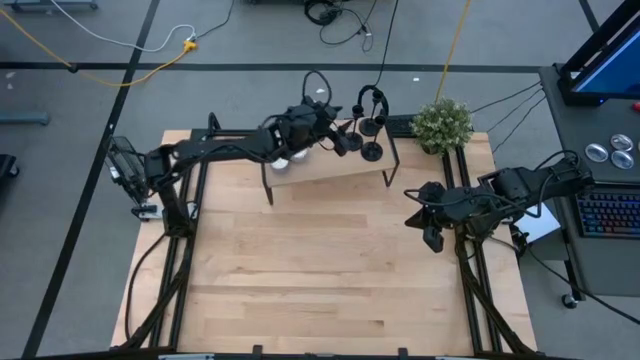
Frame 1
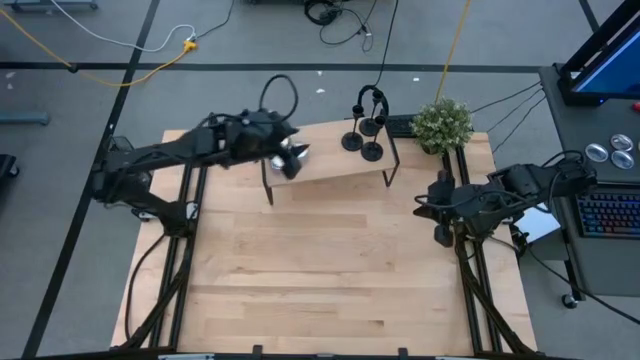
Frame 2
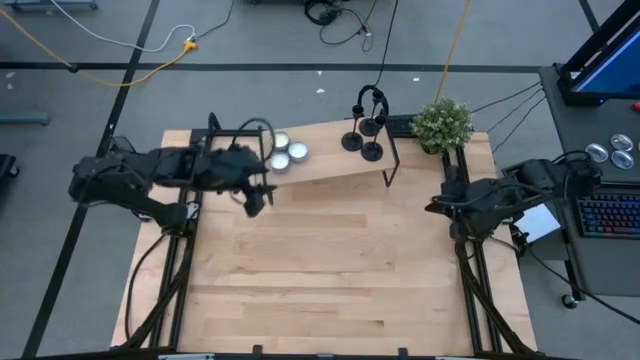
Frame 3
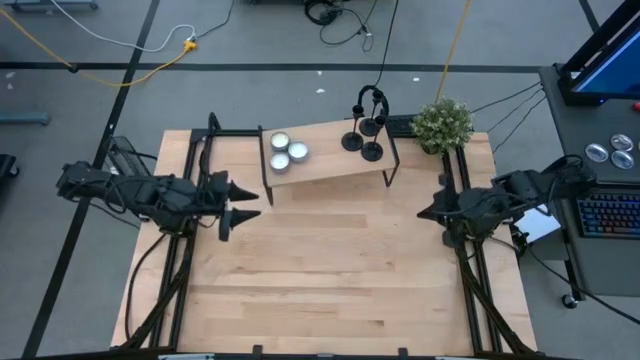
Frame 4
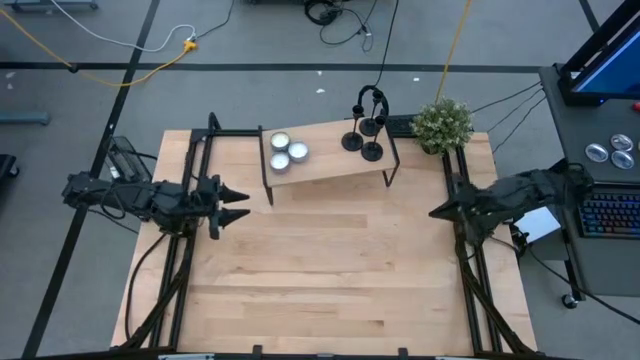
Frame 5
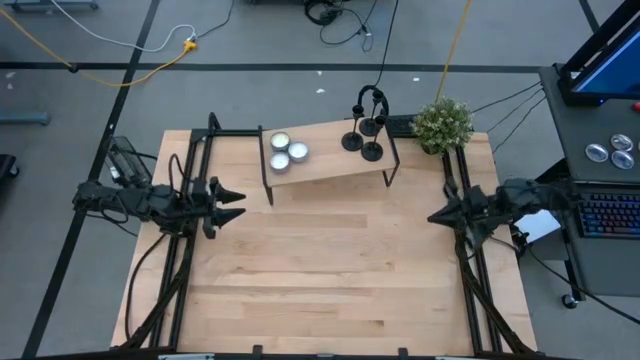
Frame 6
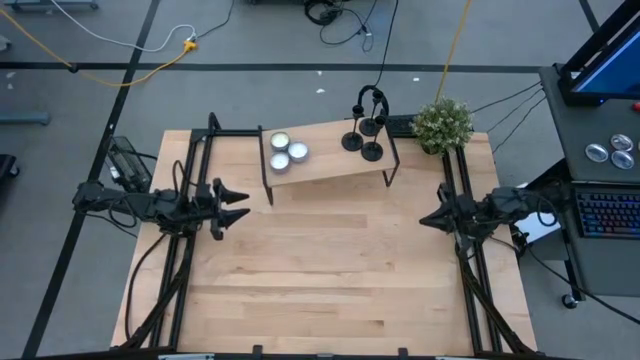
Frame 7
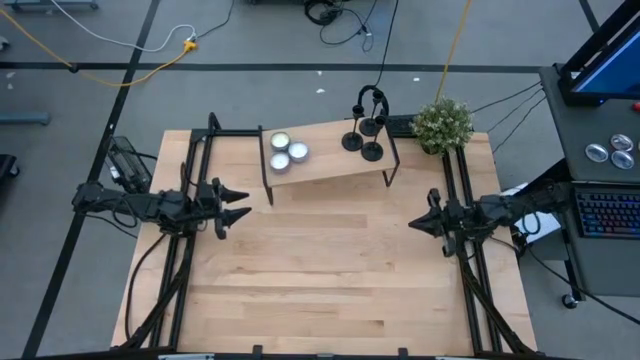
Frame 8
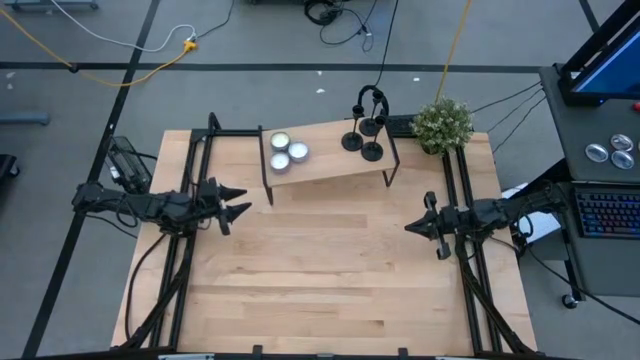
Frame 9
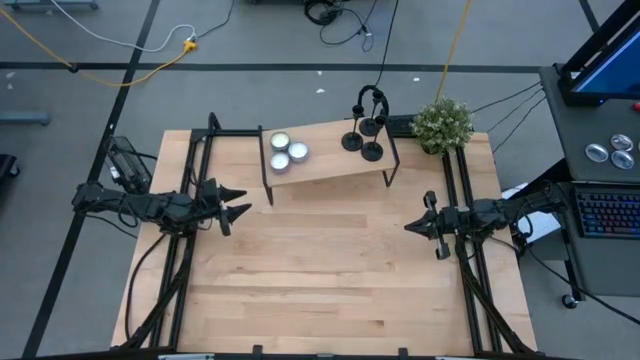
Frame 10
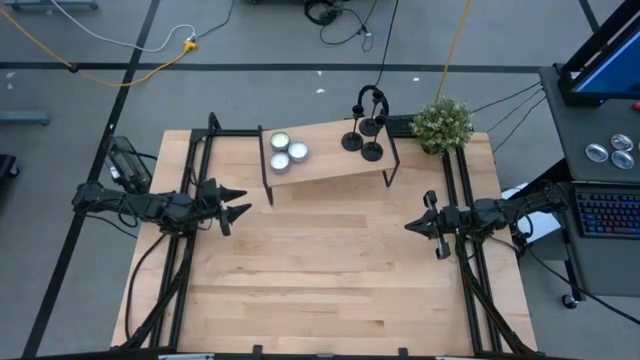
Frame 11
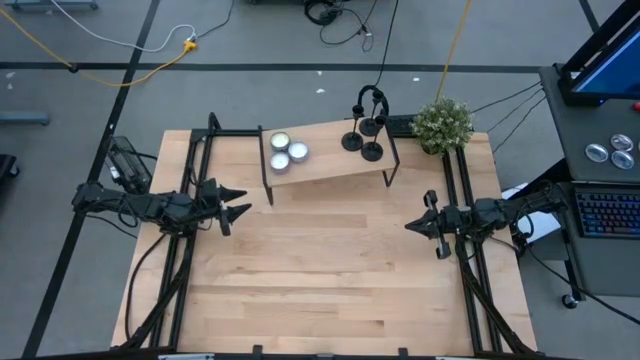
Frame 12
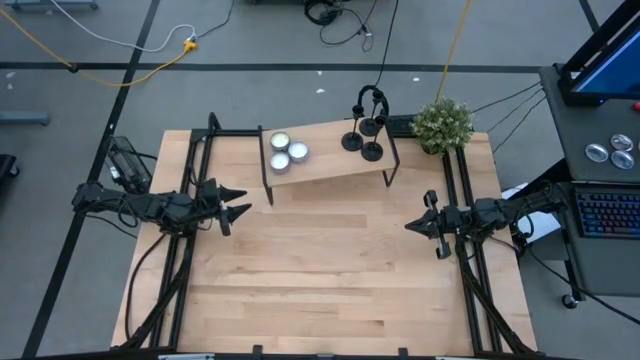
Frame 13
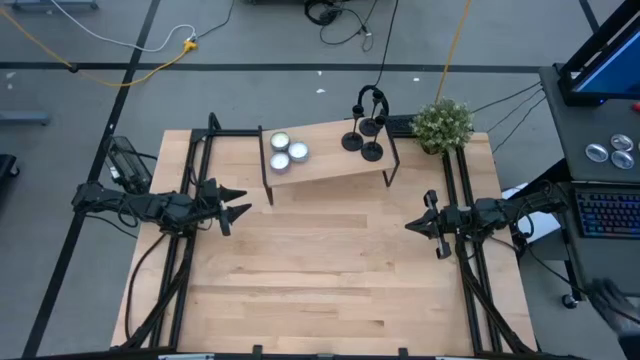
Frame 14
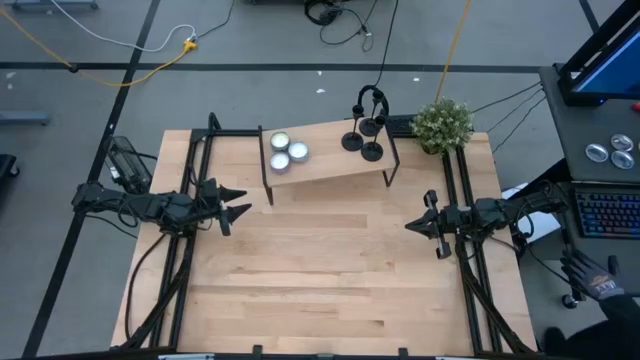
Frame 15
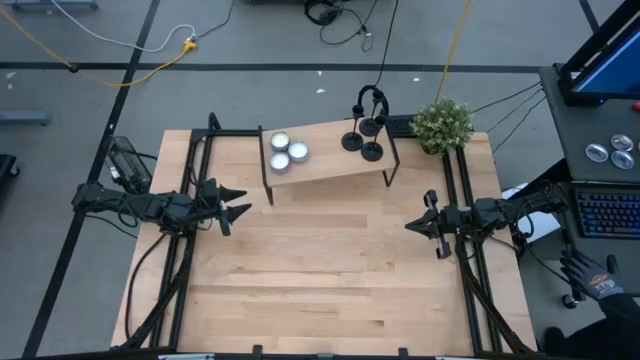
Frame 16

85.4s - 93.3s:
Task: Pick & Place candle stick holders
Return to Home Position

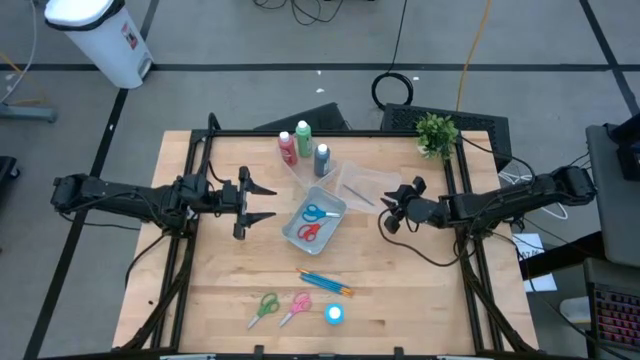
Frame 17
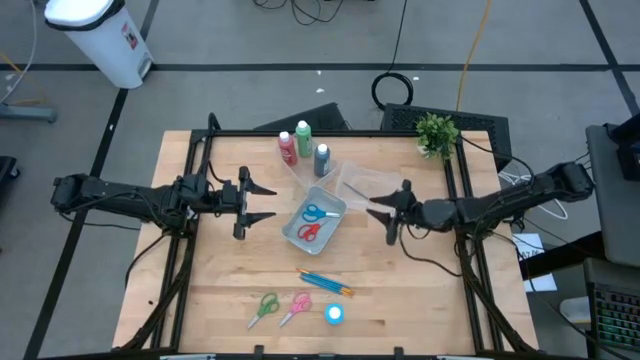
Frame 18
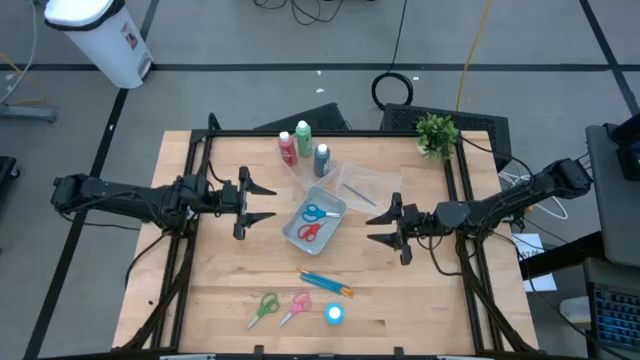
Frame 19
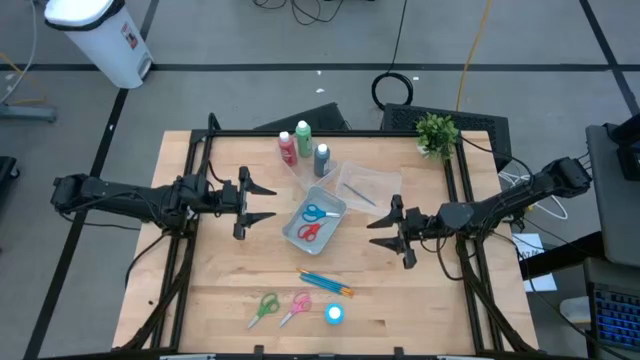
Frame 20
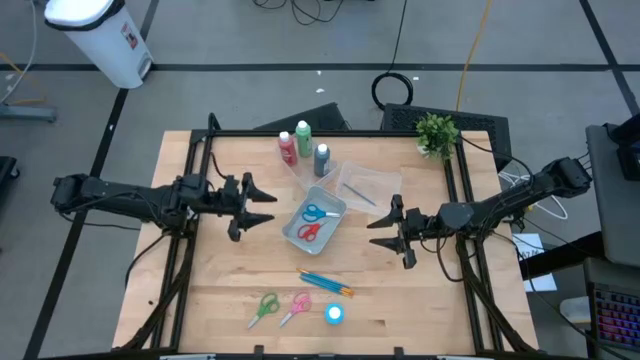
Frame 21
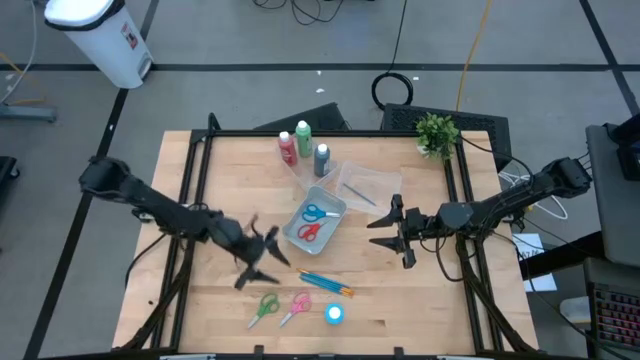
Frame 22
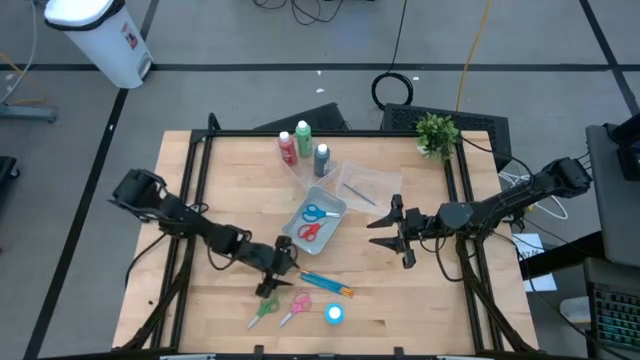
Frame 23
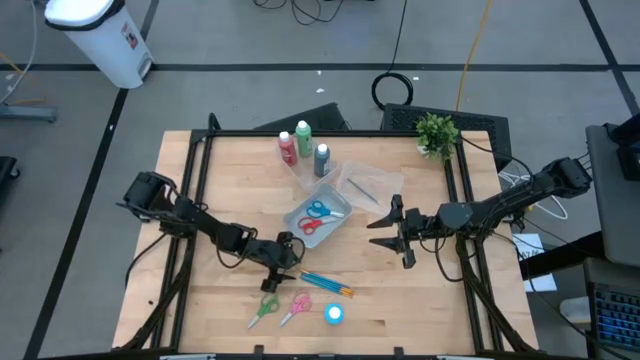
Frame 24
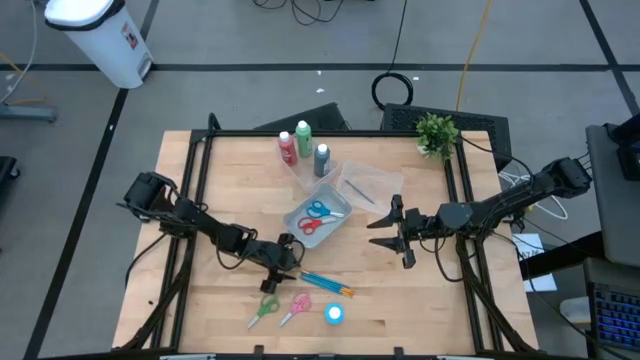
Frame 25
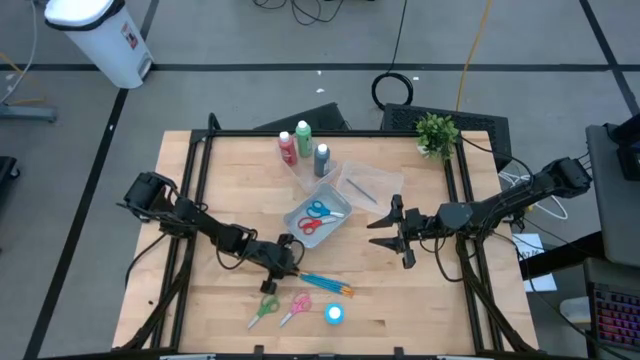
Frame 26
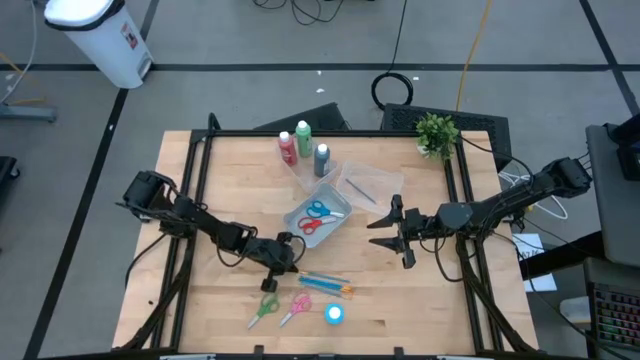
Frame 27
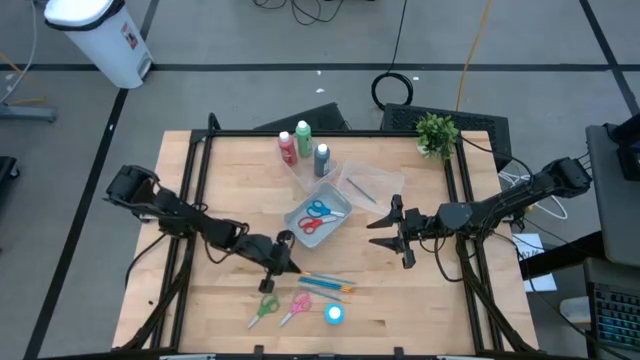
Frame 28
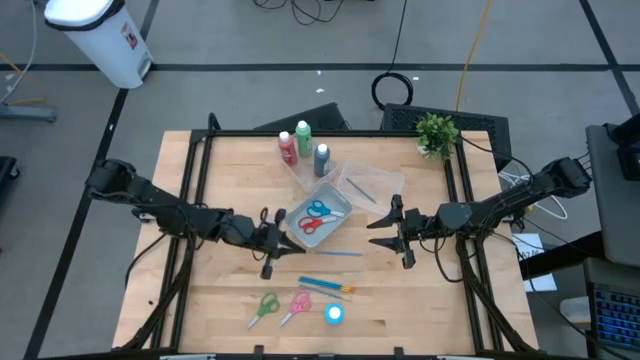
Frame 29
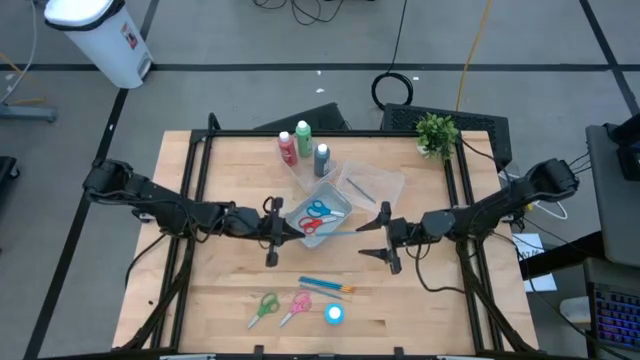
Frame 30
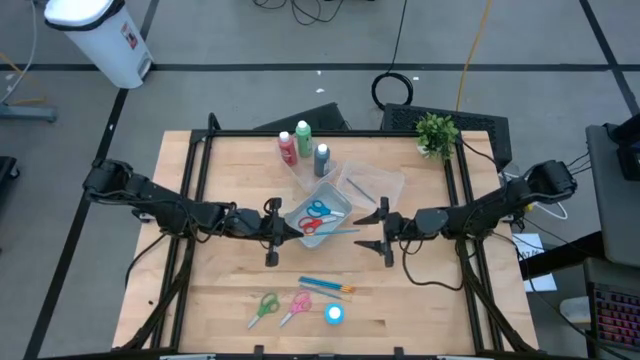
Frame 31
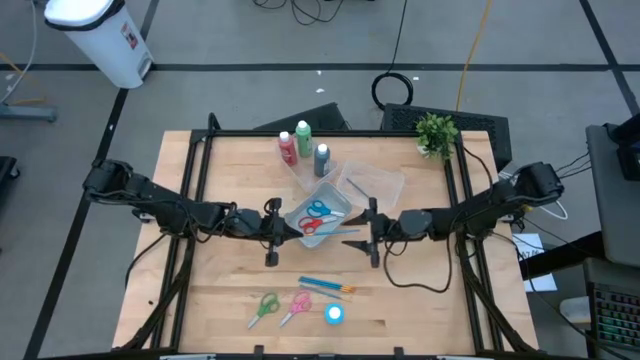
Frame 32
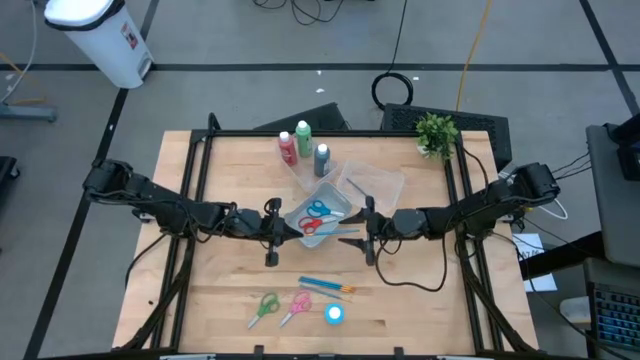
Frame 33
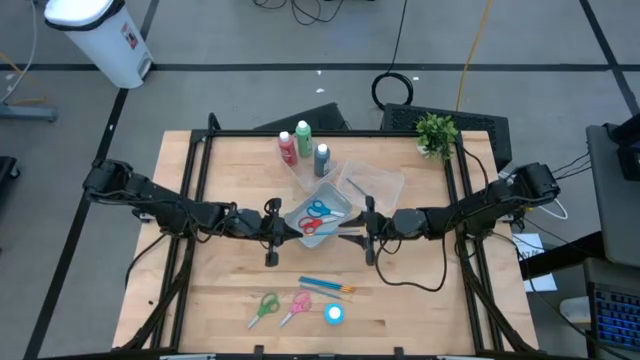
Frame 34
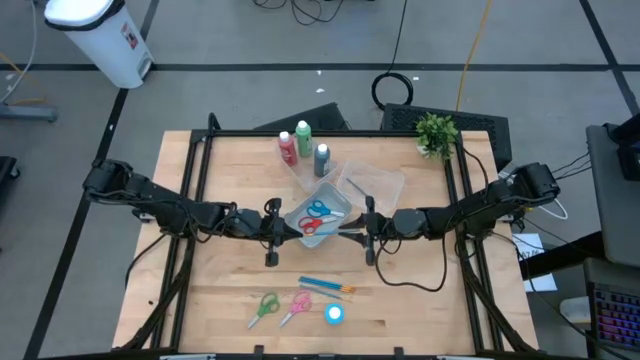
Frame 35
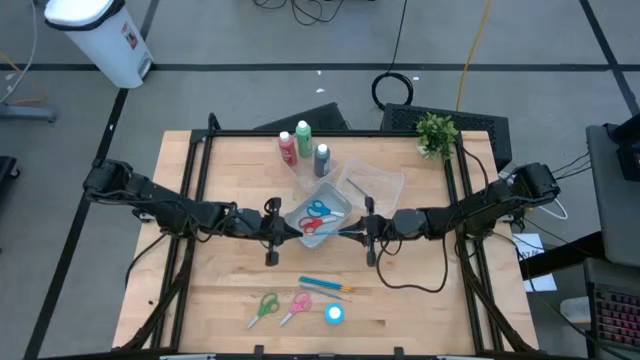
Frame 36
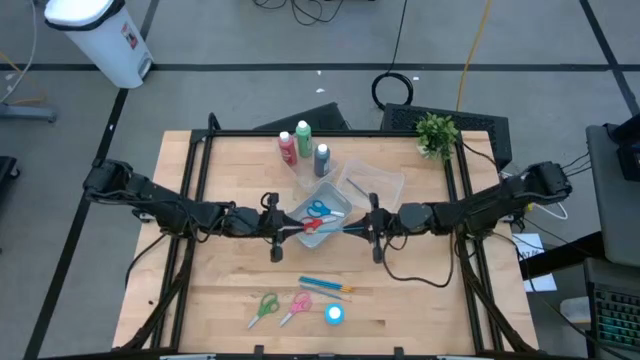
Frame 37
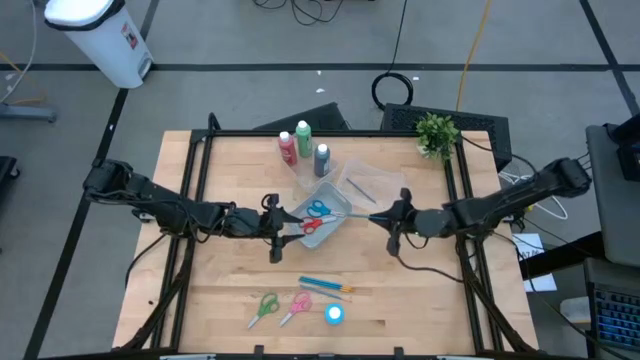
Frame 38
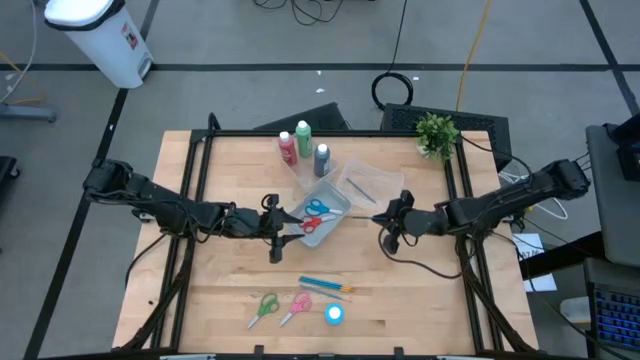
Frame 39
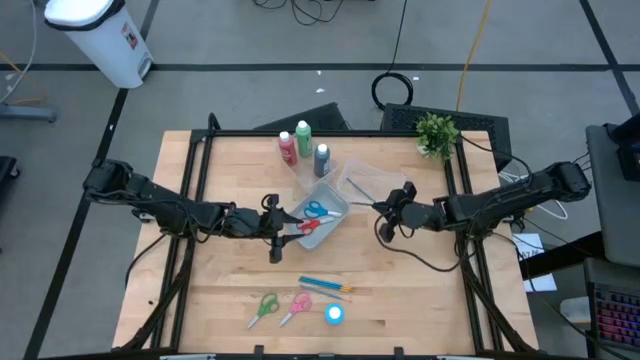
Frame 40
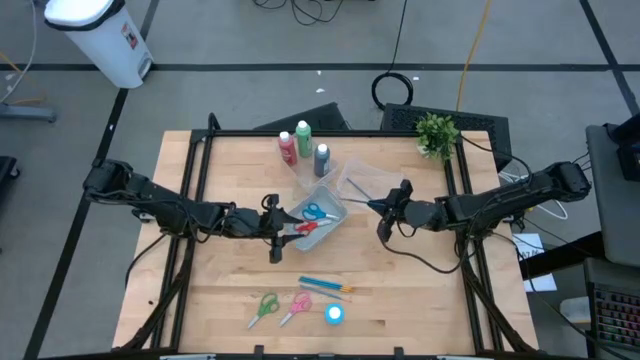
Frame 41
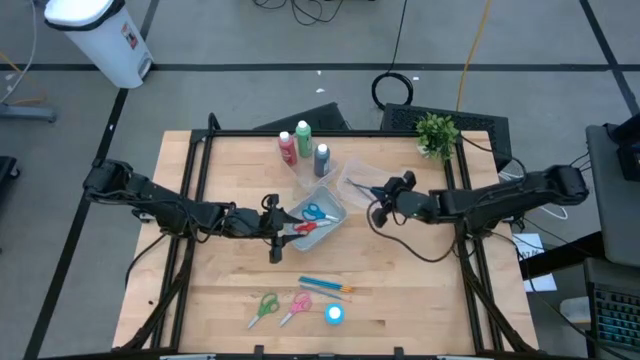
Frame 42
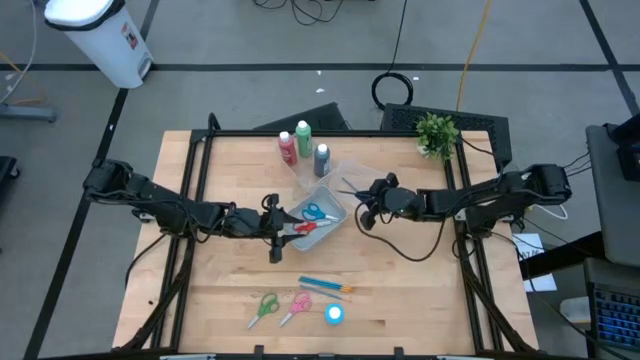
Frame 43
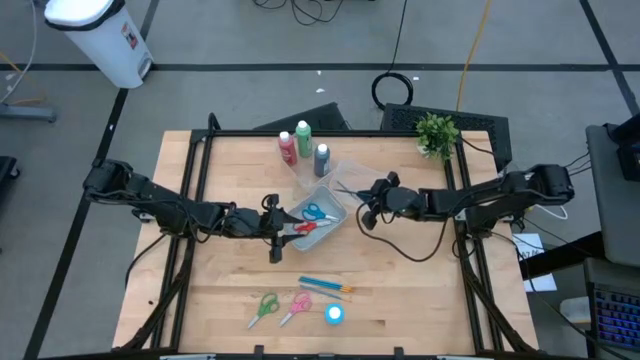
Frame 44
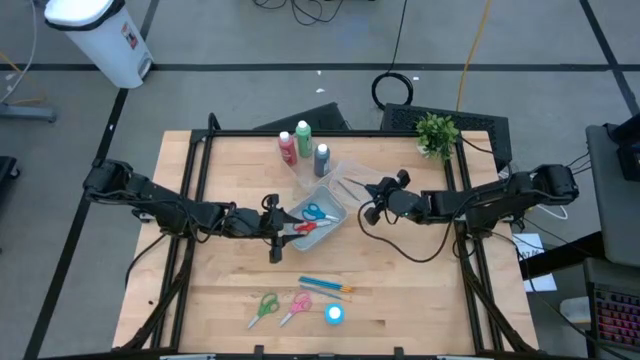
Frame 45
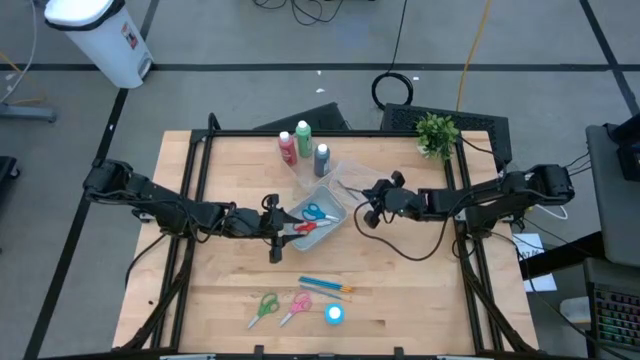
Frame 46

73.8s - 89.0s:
Task: Pick & Place Paint Supplies
Put the blue paintbrush into the right transparent bin
